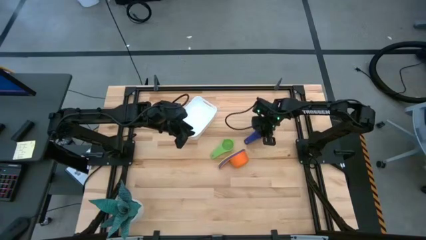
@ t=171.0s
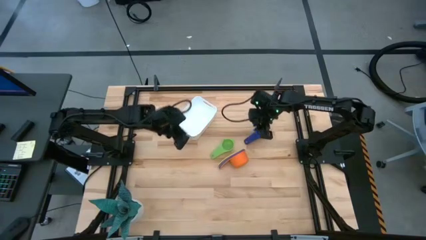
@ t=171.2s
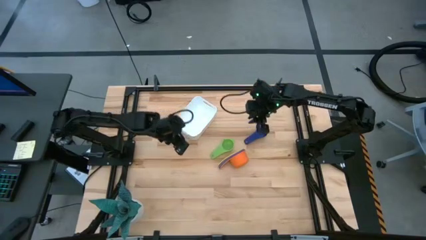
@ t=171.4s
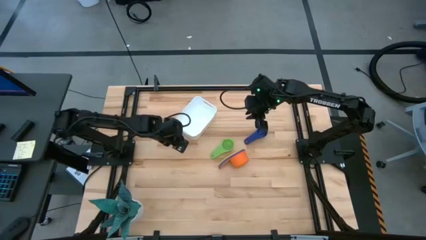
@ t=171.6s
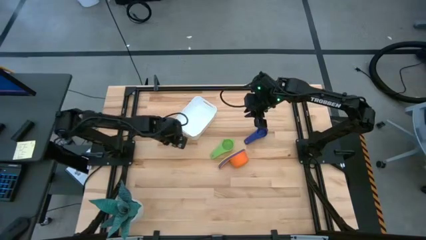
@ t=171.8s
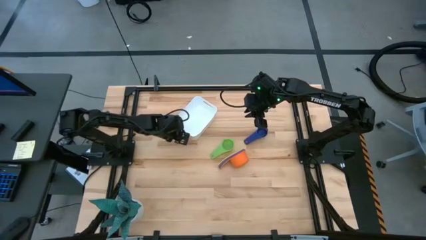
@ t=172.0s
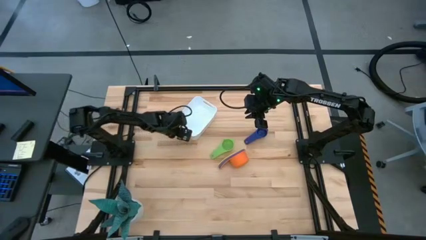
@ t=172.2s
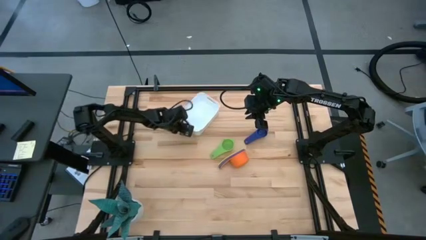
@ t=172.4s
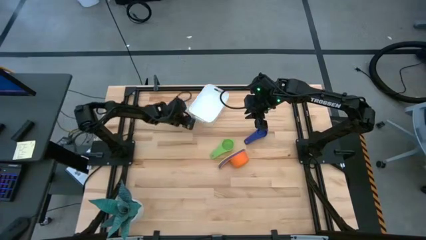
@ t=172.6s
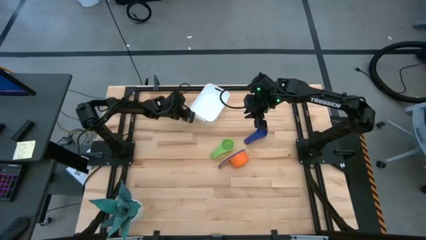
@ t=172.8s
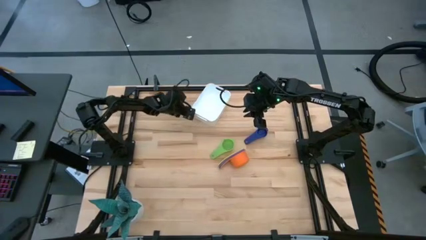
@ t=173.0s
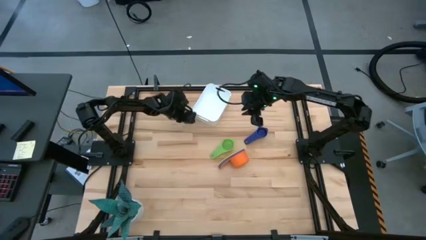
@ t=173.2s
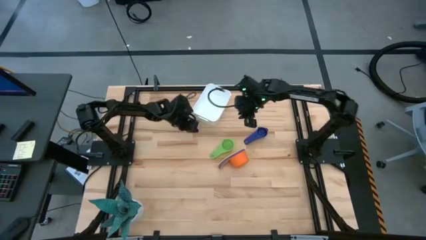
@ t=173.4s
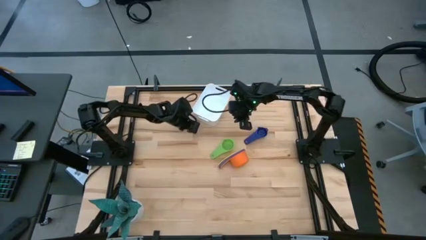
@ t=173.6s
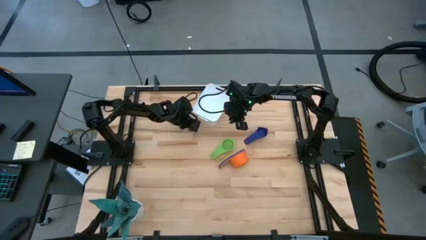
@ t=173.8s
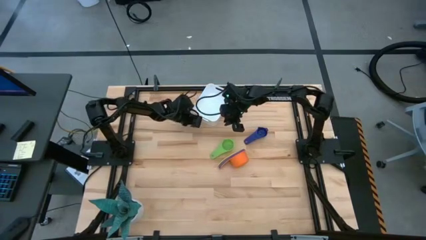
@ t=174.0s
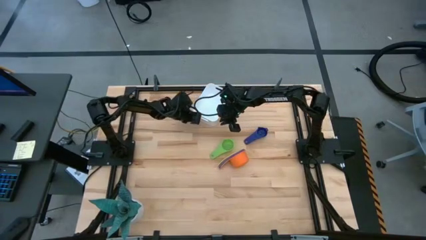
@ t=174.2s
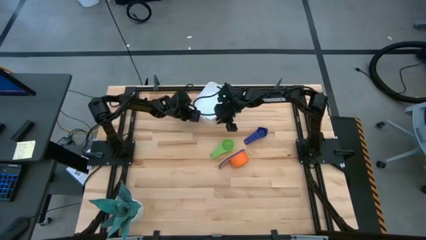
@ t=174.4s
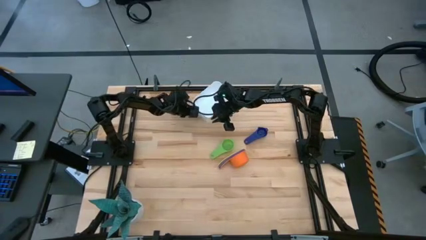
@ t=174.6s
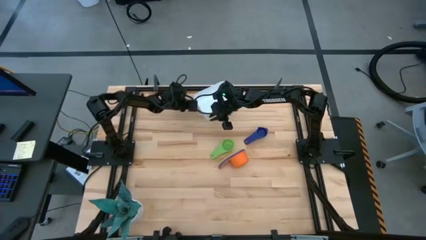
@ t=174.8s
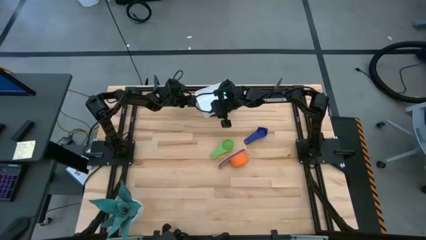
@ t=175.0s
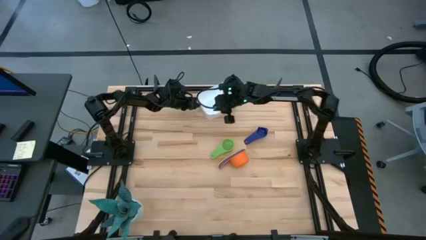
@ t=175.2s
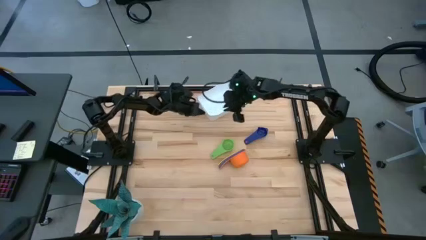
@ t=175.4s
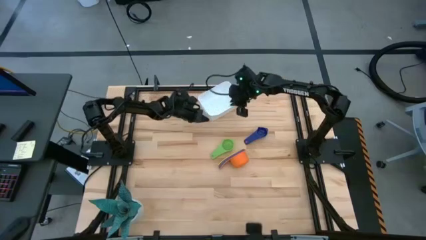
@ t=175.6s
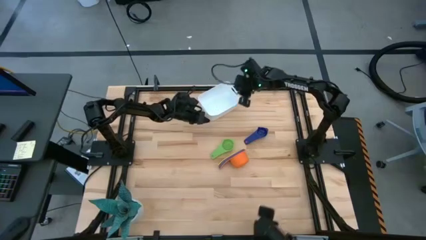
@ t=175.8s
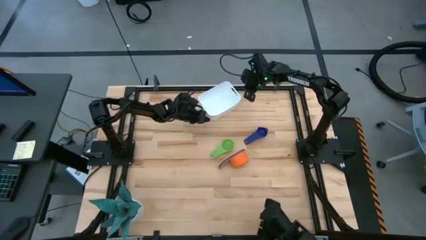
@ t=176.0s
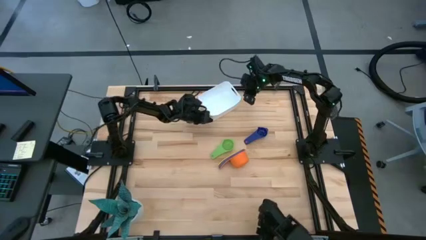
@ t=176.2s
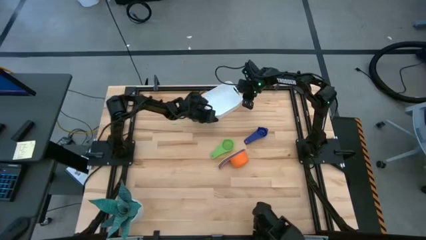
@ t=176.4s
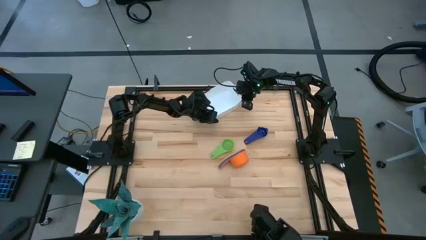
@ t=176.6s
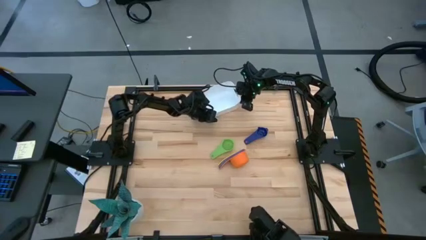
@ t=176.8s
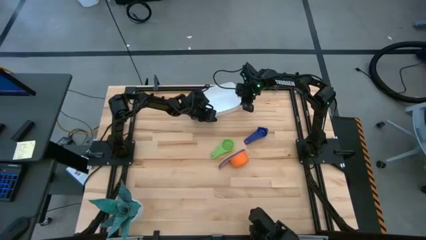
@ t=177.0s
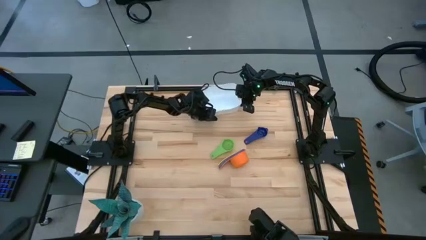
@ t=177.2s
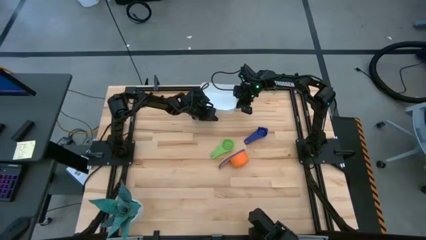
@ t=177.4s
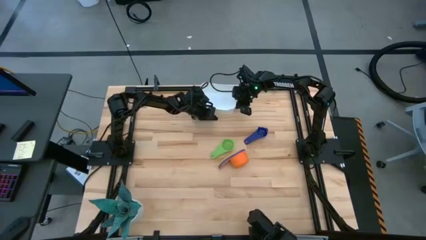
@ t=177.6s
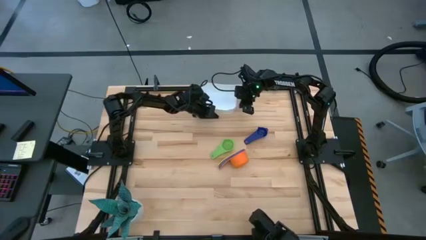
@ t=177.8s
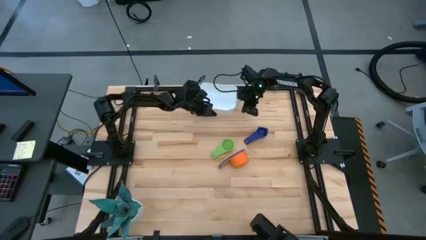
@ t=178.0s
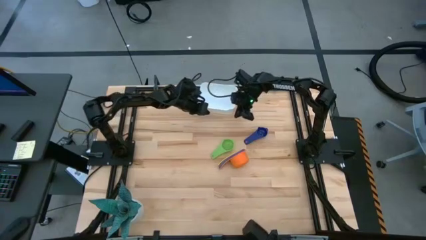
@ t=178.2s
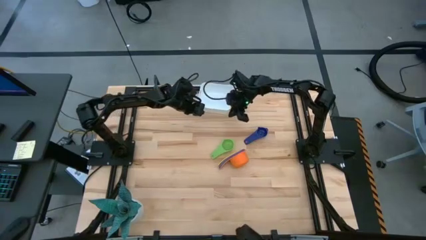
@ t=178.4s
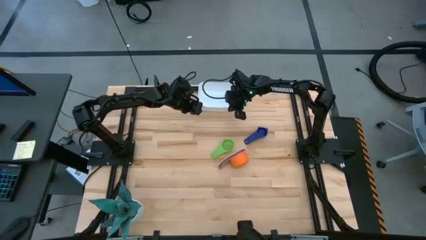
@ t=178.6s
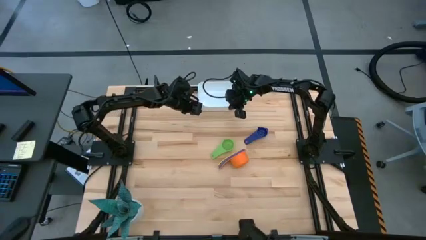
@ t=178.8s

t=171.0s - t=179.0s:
Task: Nest measuring cups in basket
Adjust the white bin

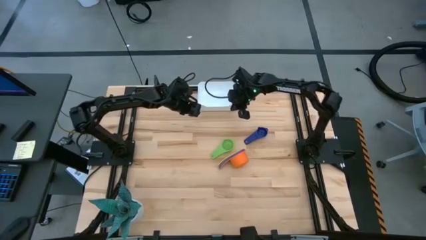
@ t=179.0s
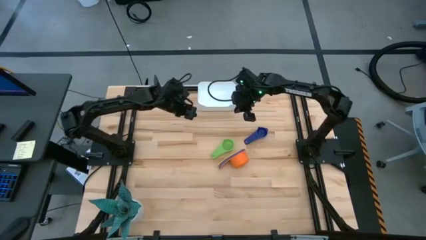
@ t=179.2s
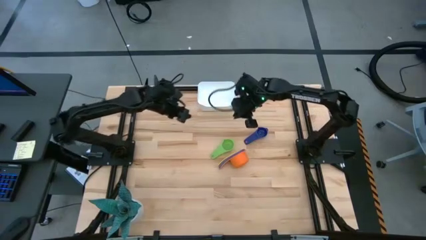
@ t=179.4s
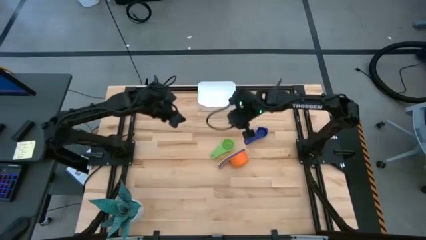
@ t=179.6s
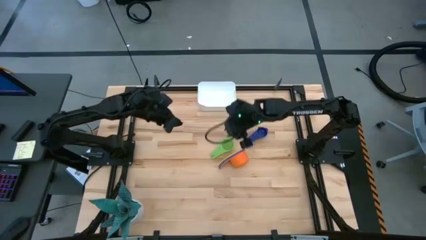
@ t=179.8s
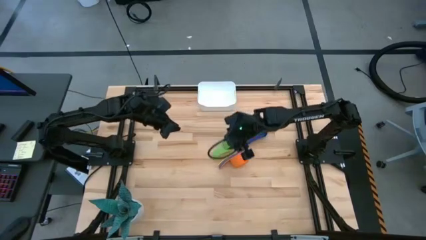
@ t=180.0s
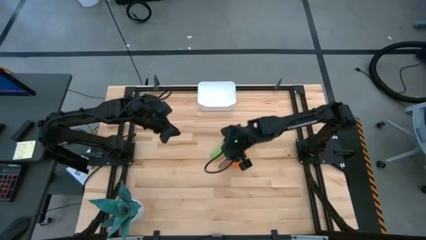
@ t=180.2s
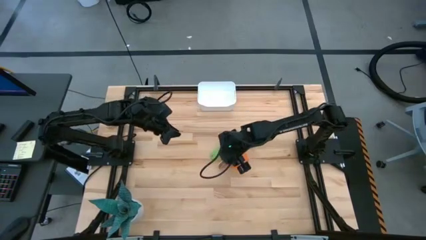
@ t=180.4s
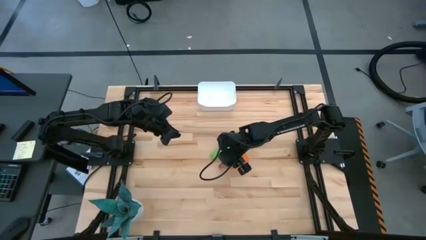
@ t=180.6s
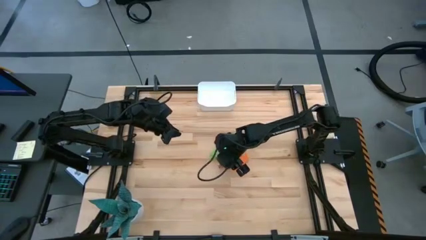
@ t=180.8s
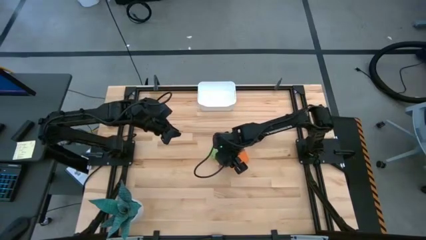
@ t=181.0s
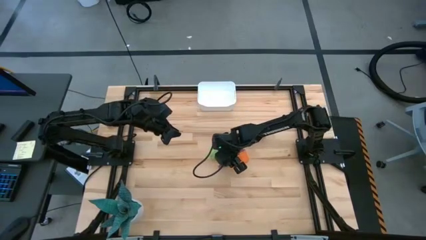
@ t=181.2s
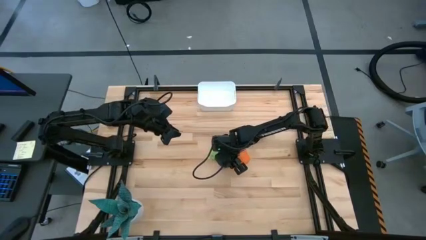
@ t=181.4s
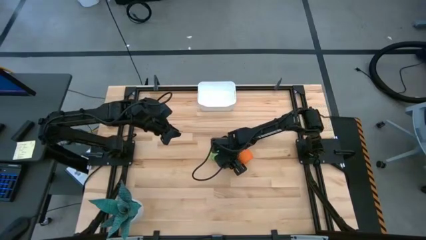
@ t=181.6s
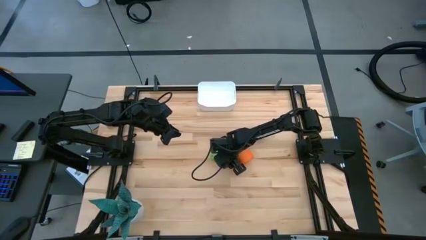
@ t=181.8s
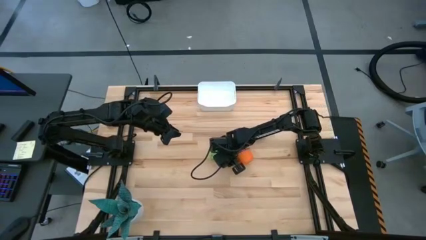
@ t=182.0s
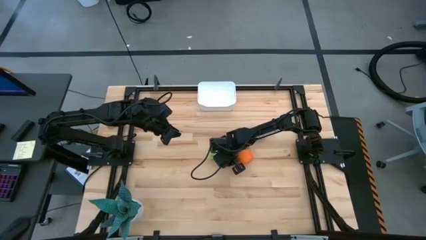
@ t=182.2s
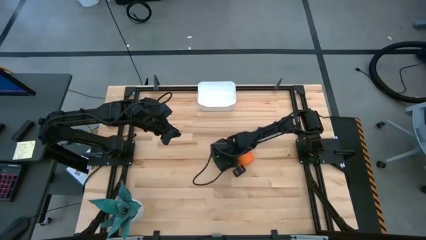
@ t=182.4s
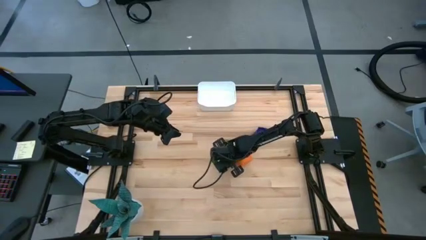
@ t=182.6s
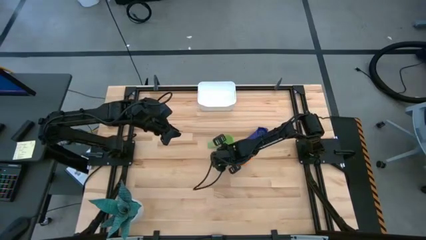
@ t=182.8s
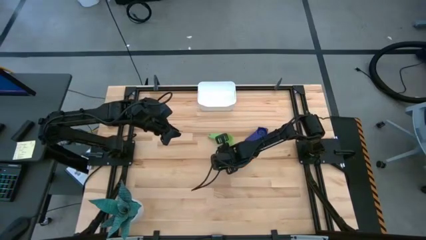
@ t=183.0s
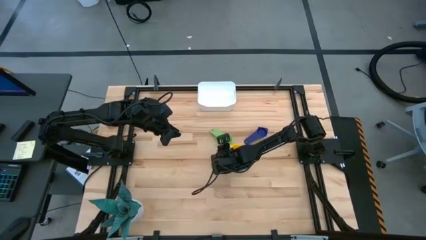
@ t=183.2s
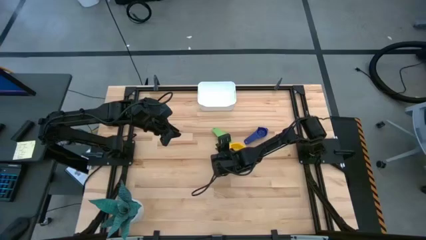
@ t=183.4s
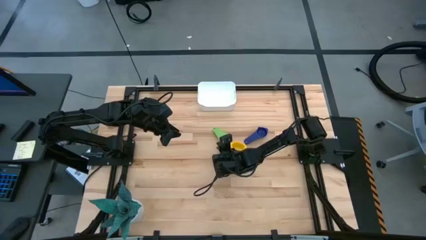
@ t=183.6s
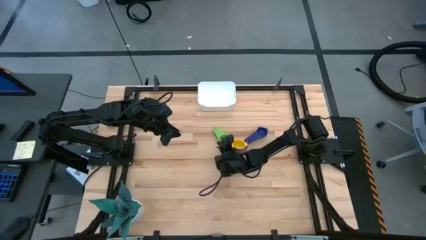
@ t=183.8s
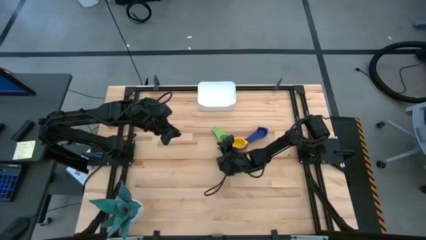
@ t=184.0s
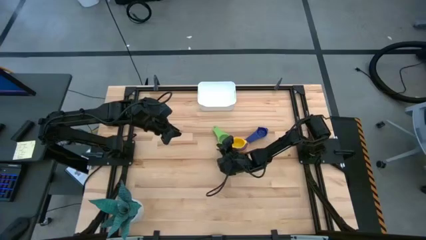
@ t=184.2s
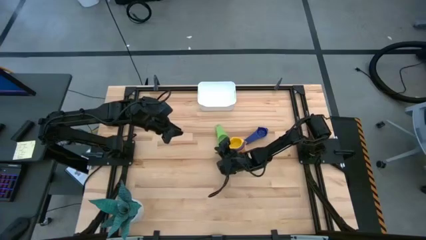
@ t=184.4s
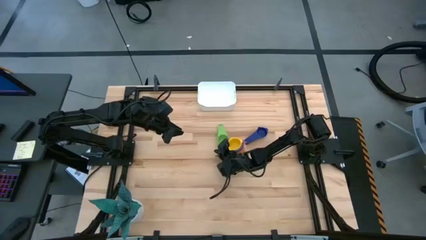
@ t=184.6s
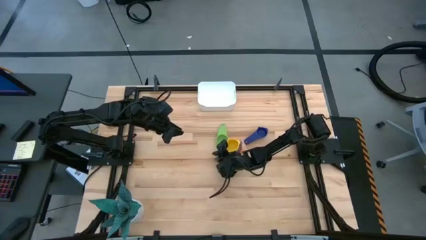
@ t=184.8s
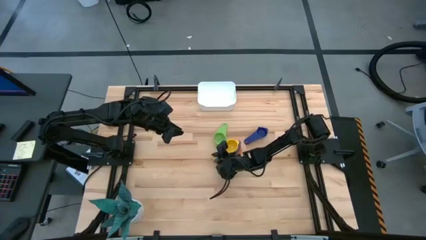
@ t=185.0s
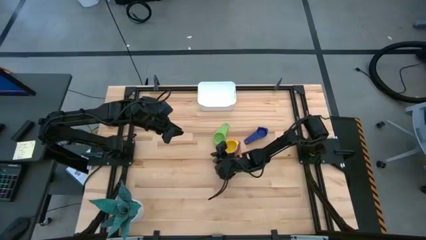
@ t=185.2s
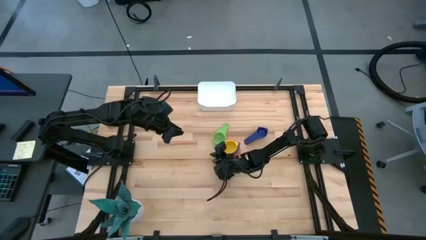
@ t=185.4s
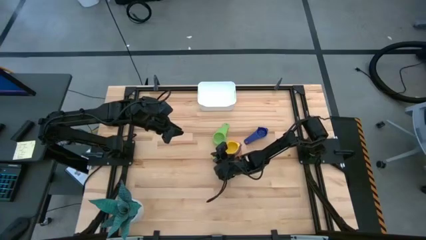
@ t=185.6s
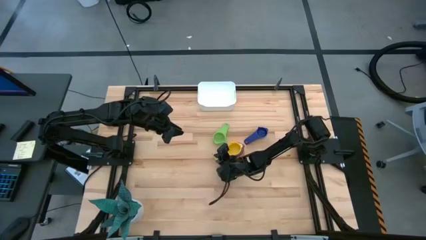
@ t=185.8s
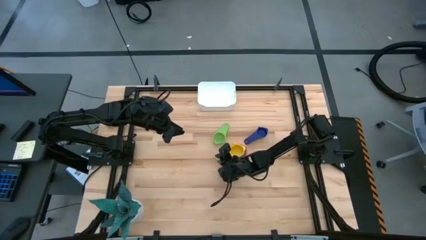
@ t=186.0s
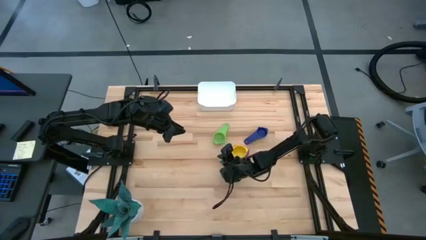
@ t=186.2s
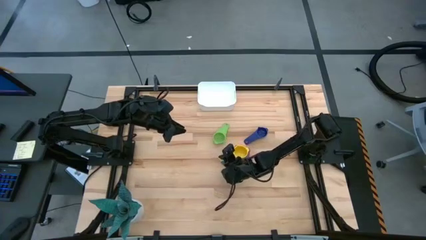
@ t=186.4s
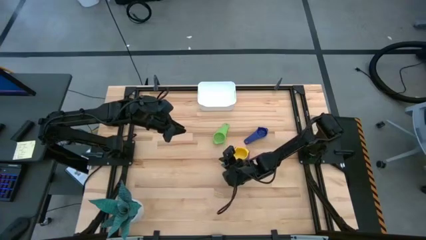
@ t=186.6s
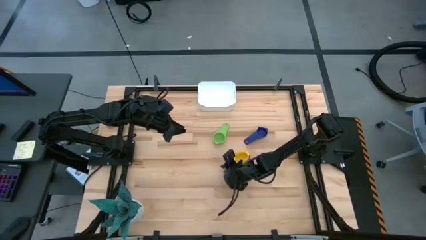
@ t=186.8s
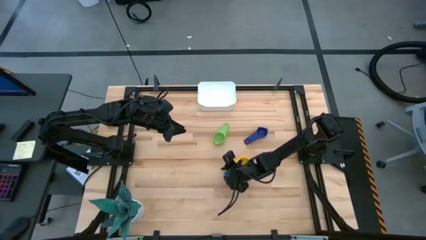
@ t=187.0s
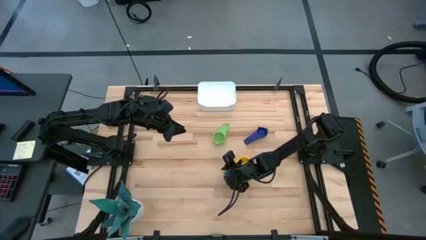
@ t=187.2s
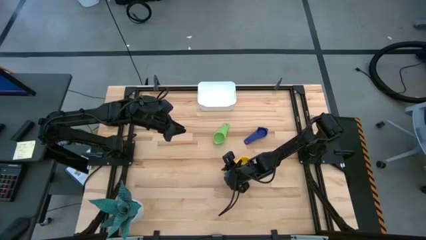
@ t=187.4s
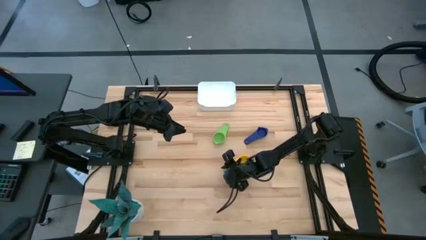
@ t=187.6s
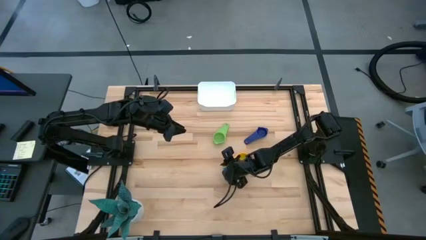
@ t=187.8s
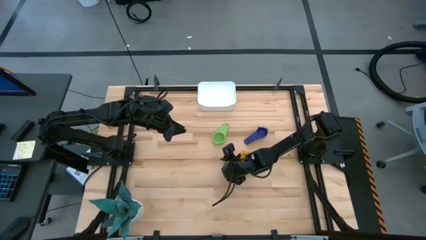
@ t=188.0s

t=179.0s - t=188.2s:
Adjust the stacked measuring cups
